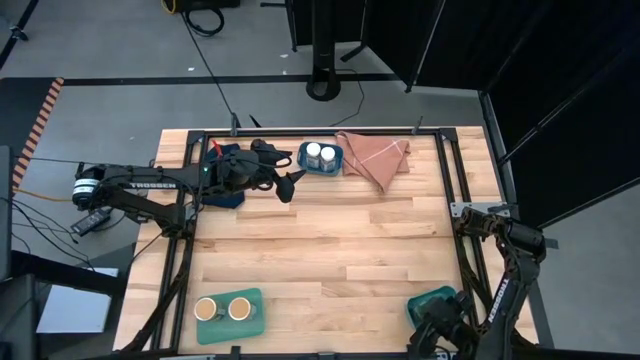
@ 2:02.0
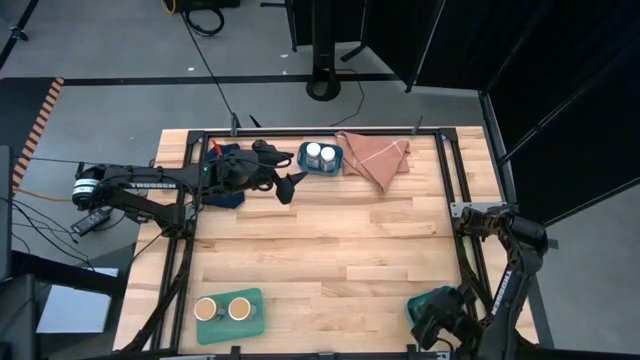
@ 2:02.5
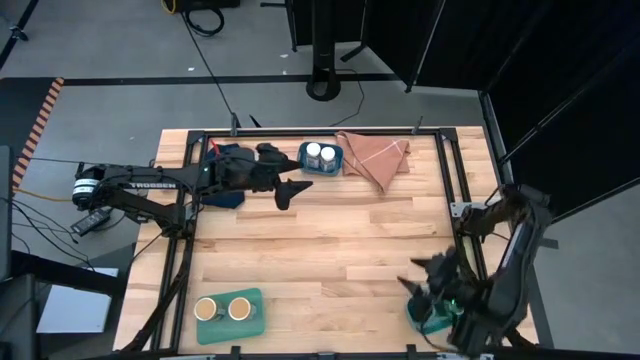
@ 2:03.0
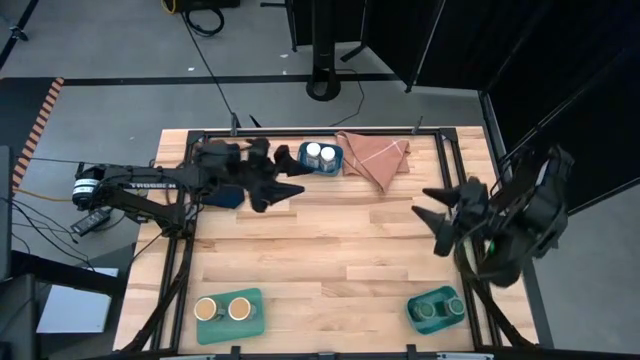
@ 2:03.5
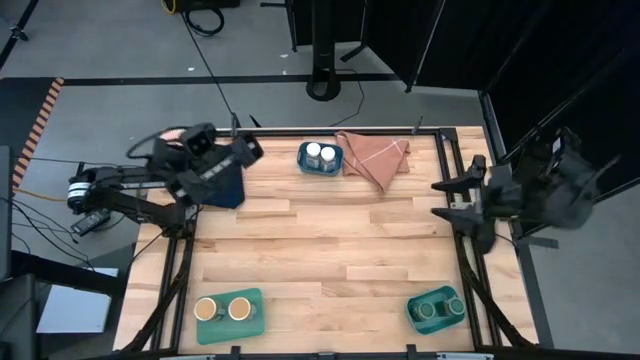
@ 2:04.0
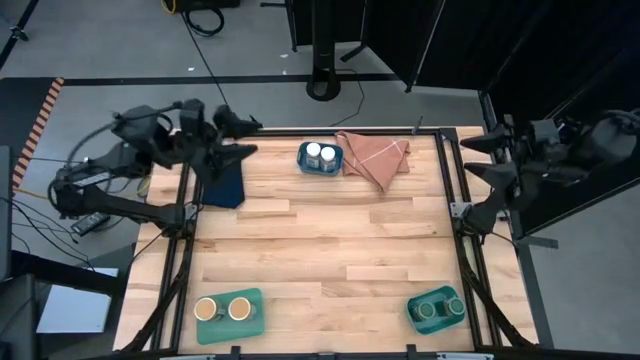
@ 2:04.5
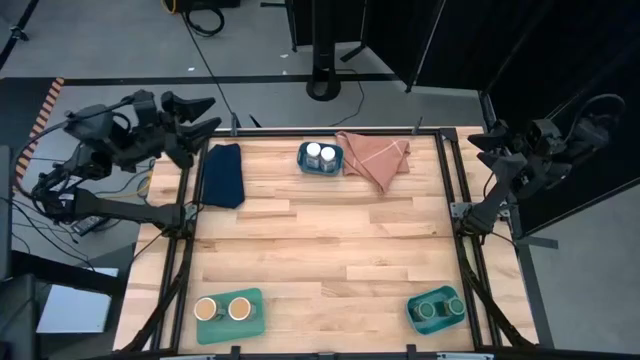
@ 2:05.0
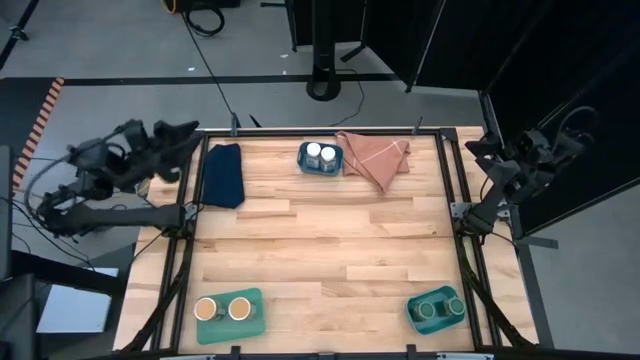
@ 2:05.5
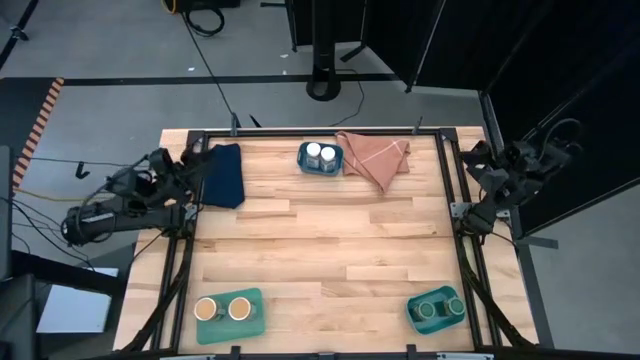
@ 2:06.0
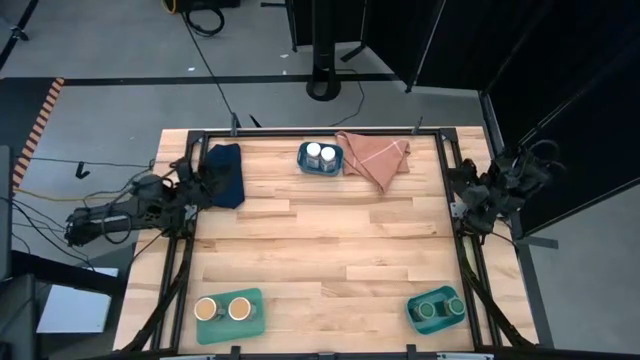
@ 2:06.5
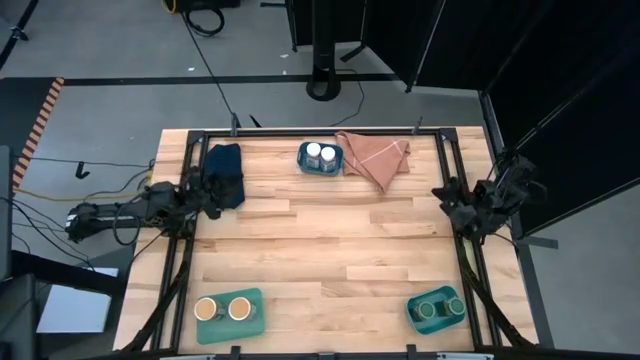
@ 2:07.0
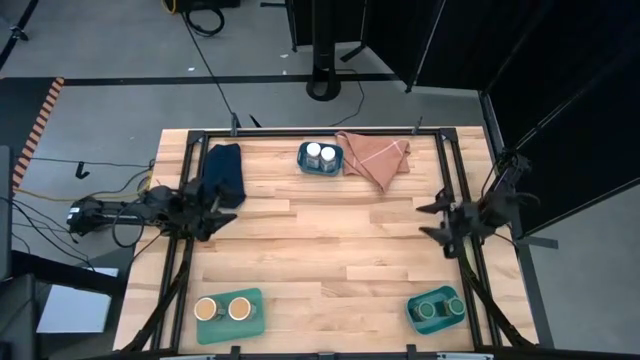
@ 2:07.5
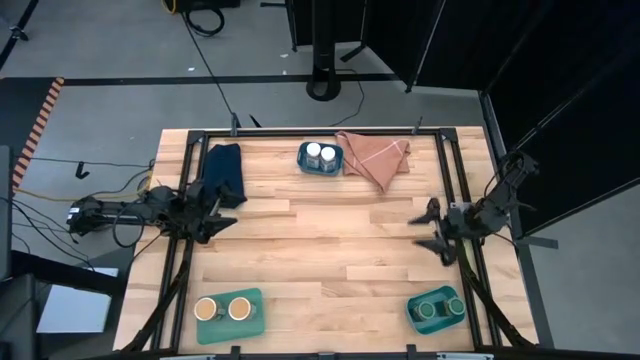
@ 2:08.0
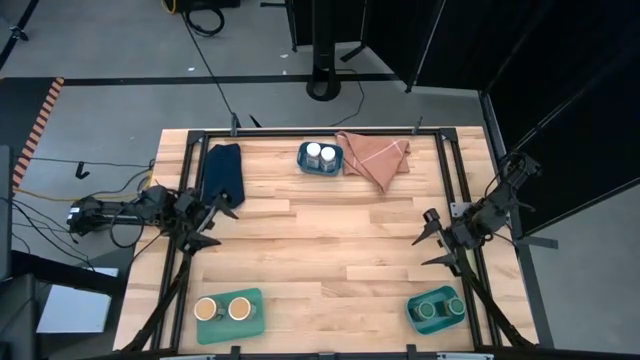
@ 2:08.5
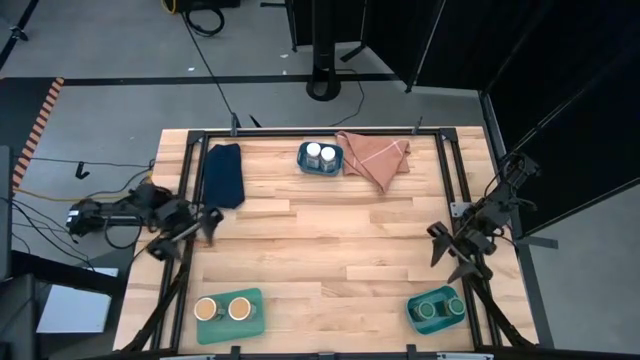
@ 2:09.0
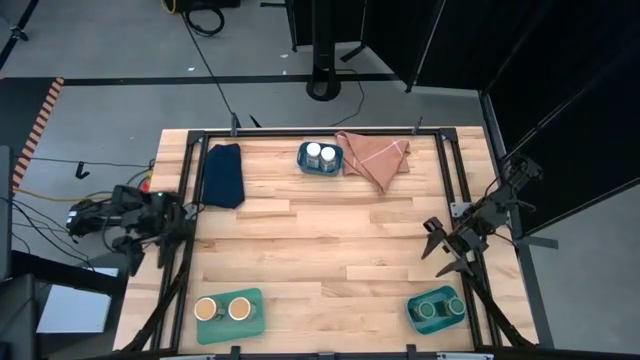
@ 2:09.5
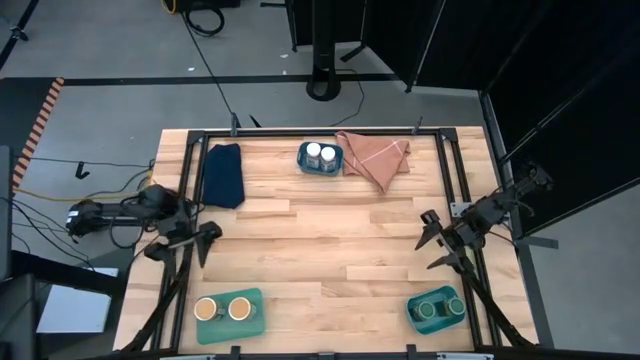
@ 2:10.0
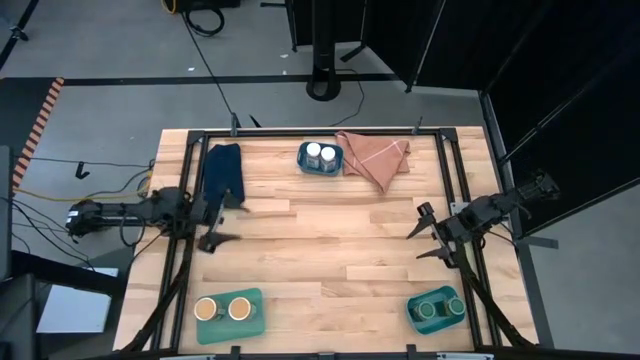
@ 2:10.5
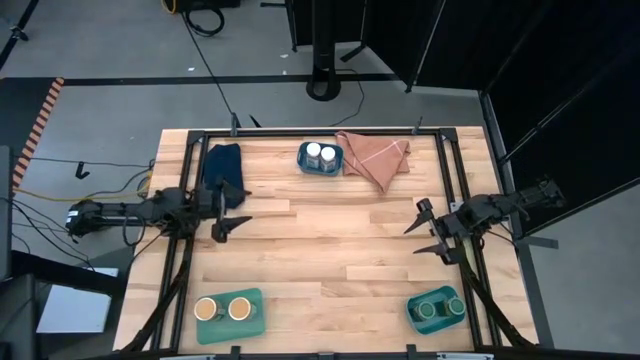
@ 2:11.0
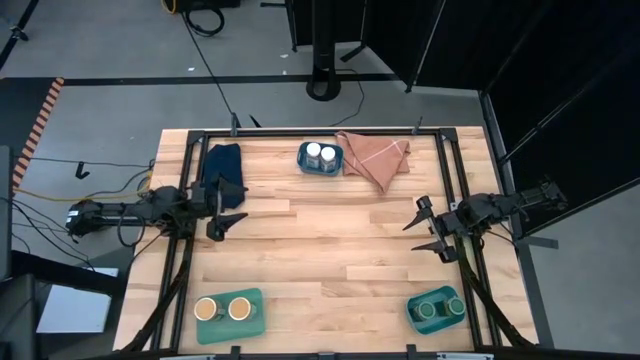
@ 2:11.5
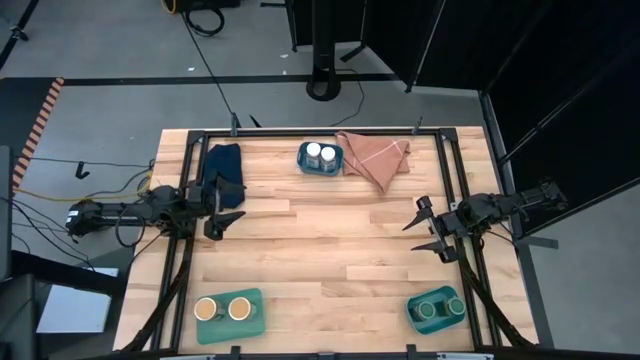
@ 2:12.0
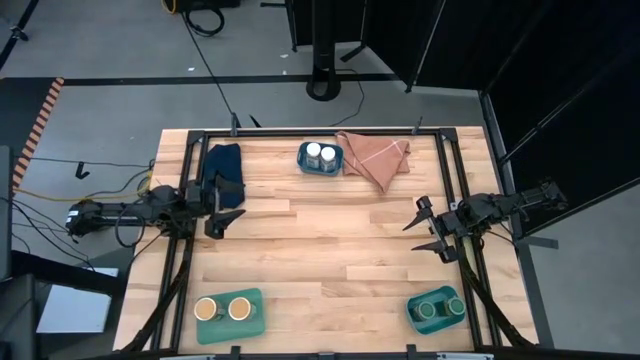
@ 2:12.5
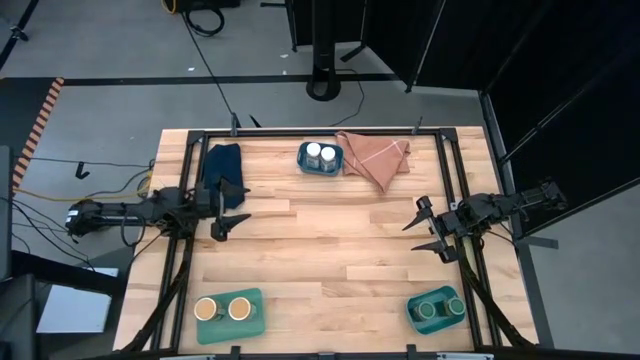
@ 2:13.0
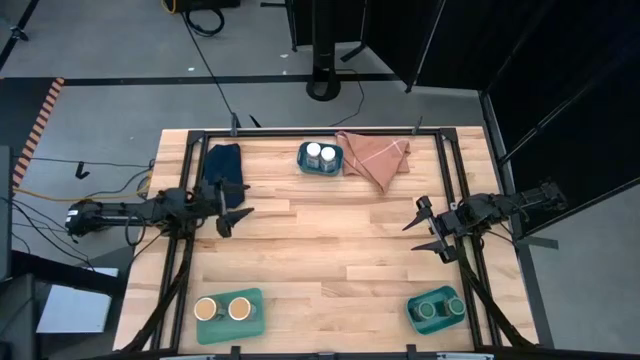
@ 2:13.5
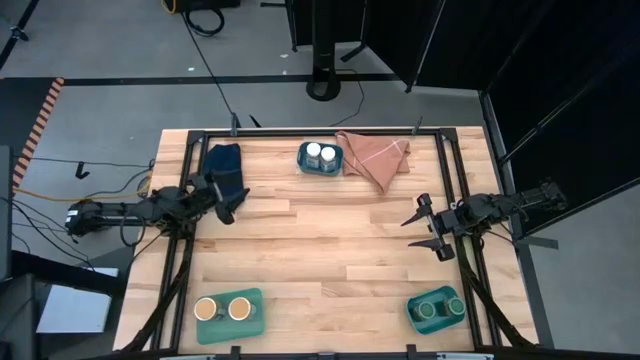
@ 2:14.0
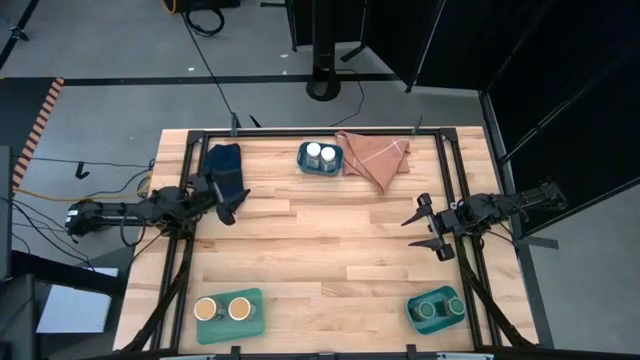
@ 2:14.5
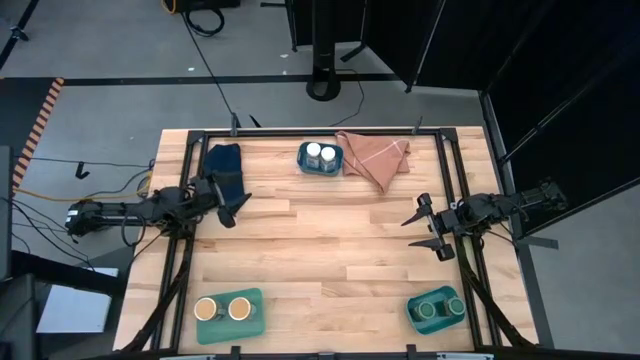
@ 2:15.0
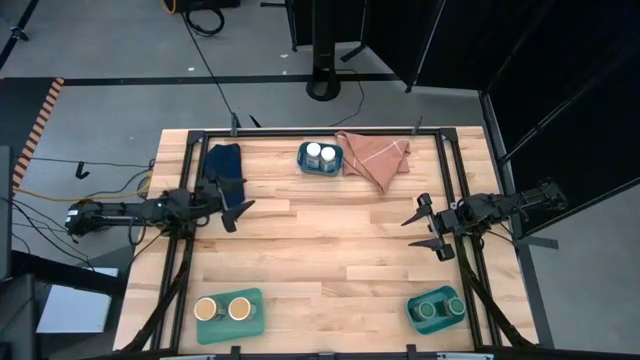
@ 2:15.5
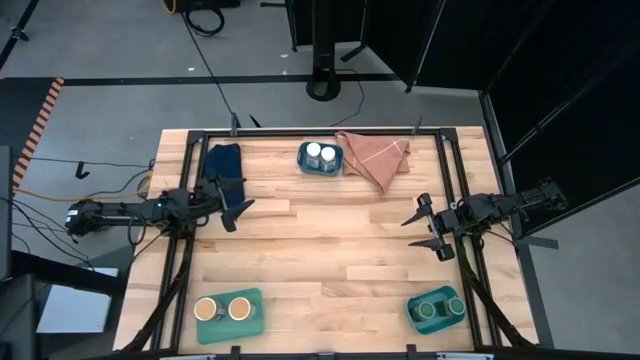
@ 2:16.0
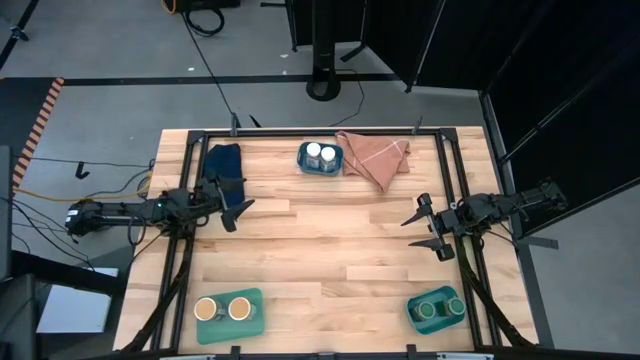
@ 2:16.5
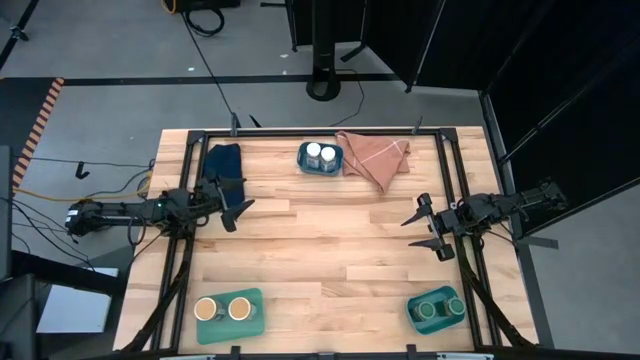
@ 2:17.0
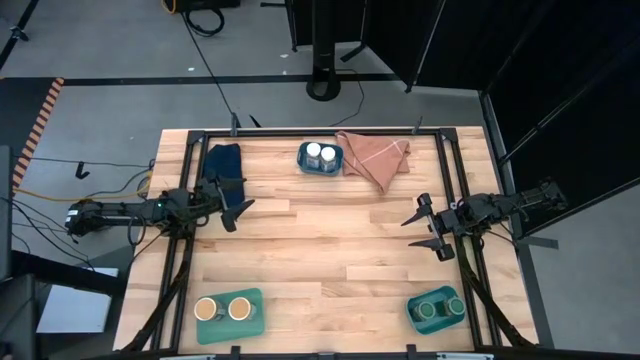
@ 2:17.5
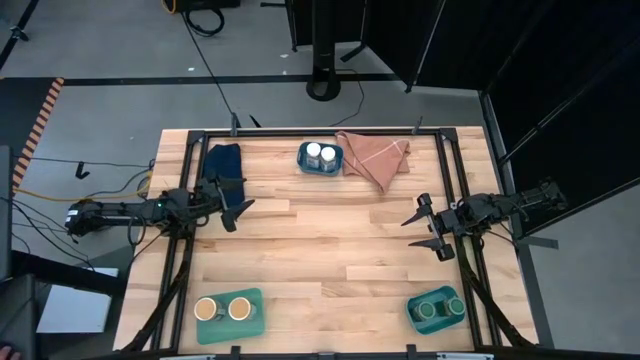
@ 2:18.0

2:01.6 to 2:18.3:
Task: Sort spices by type
Return to Home Position

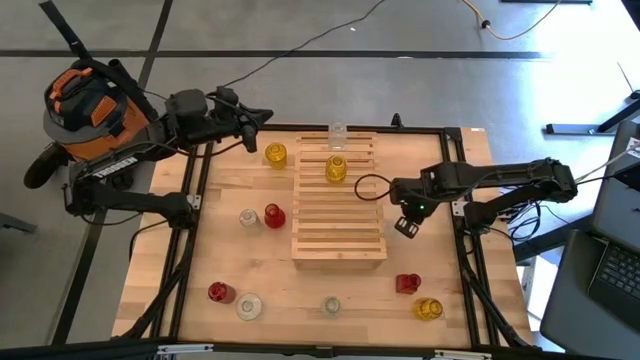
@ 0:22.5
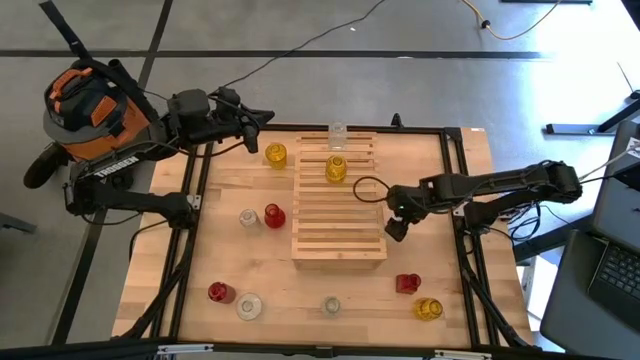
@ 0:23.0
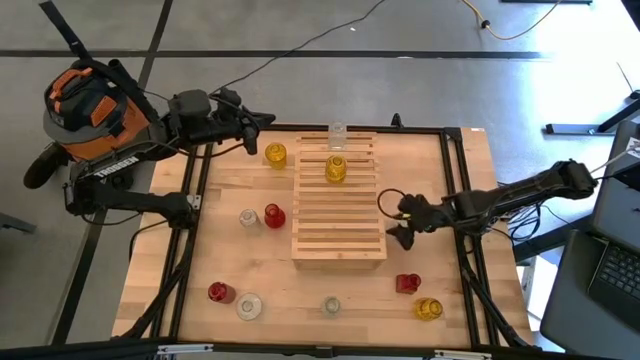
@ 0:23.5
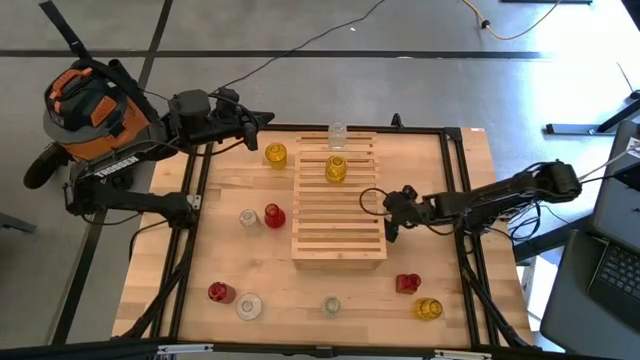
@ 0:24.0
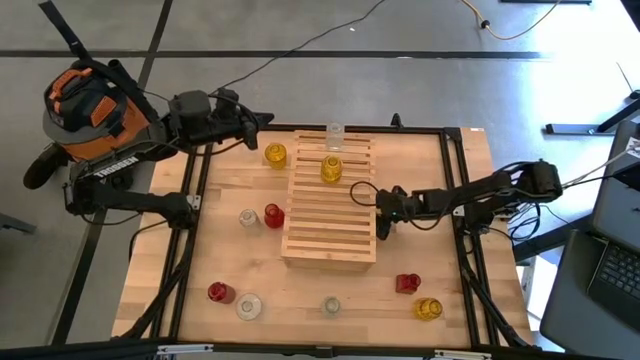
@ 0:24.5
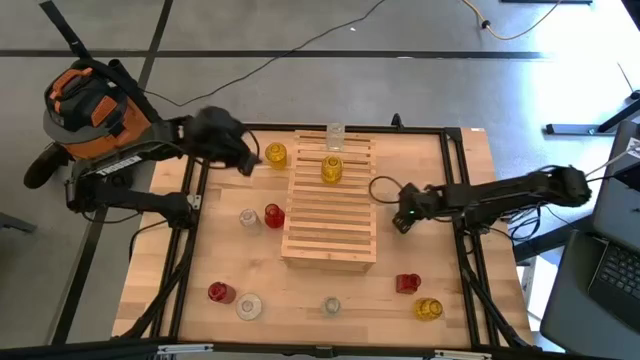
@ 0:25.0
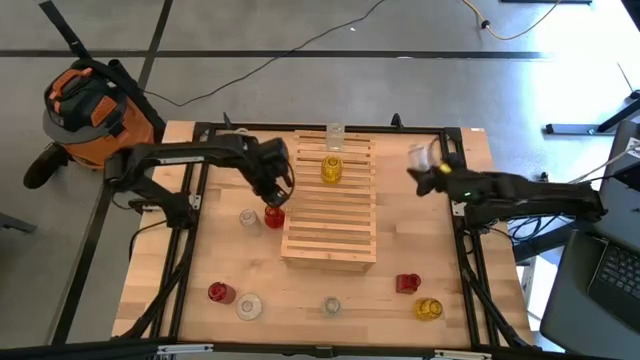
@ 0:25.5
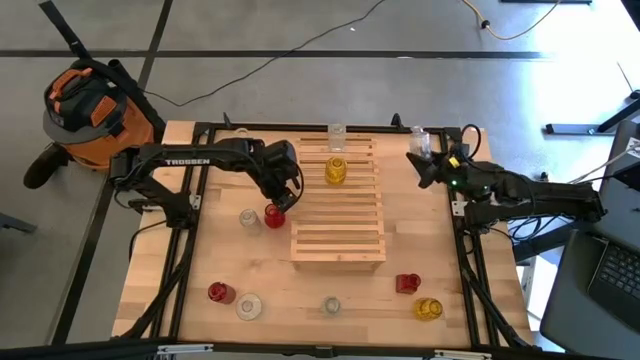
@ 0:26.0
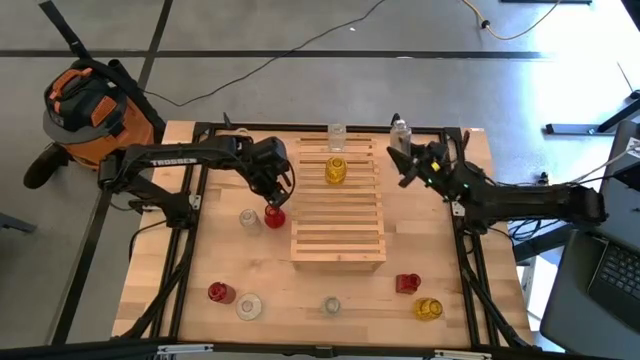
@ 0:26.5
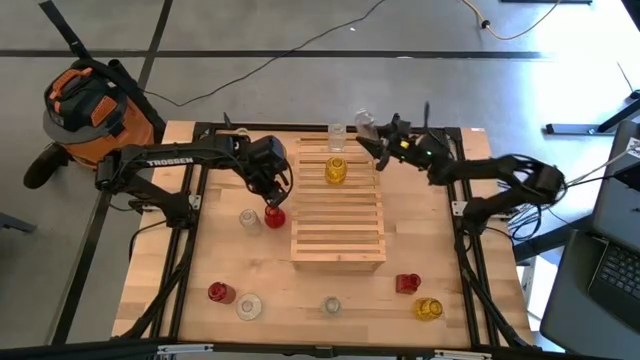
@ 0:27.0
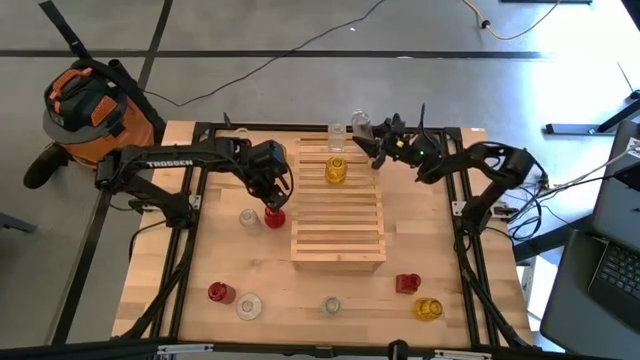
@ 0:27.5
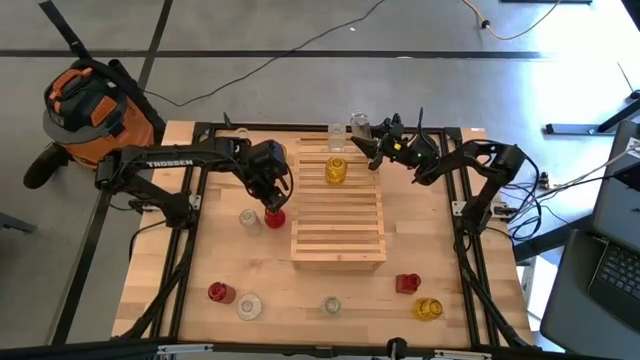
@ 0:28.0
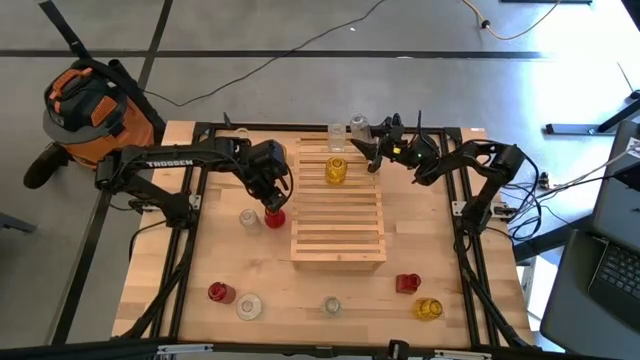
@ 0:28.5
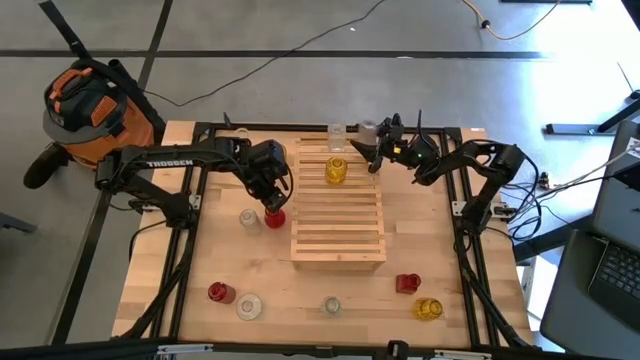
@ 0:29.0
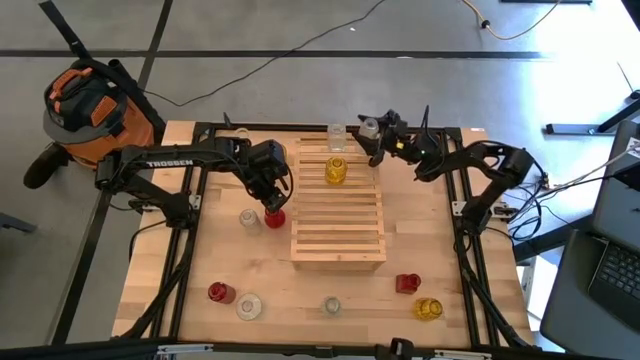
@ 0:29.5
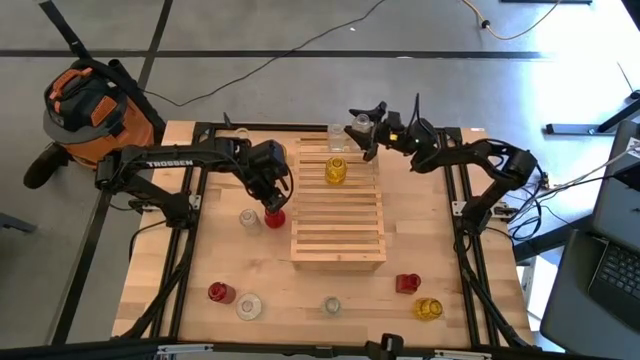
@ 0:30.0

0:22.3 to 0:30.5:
Task: sort vases onto shelf
Align the transparent vase with the transparent vase on the shelf
